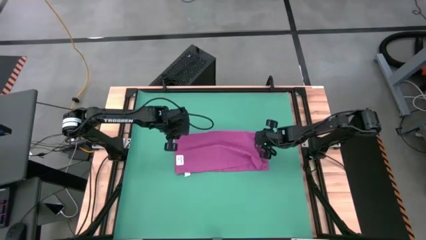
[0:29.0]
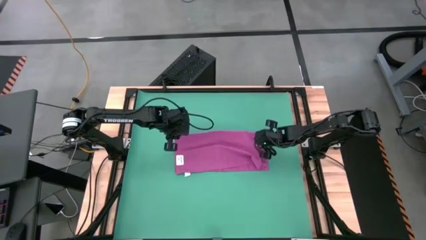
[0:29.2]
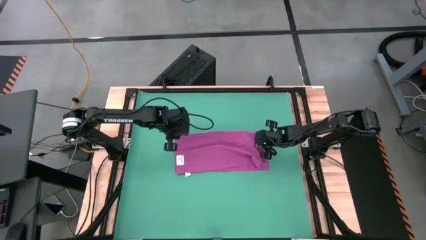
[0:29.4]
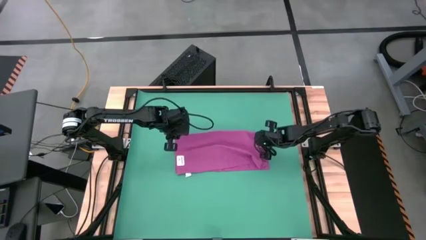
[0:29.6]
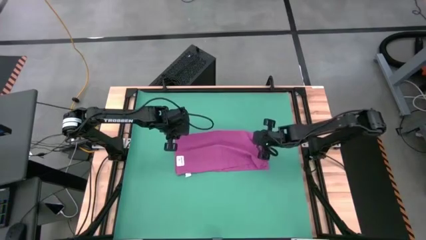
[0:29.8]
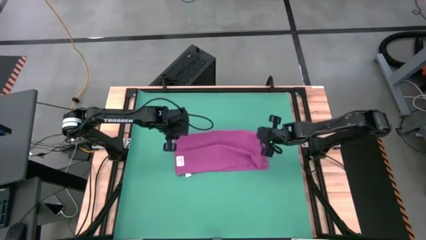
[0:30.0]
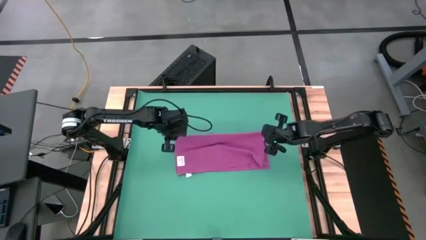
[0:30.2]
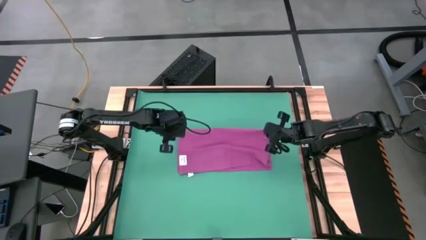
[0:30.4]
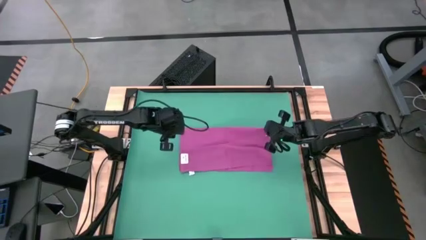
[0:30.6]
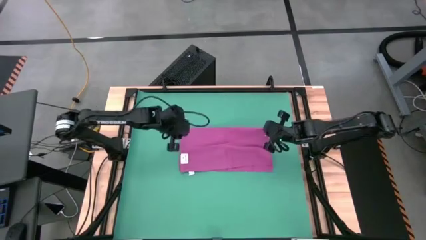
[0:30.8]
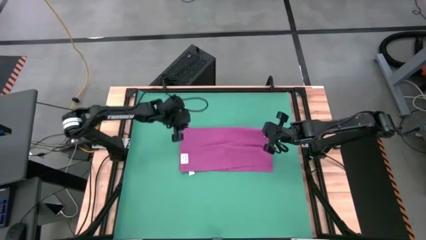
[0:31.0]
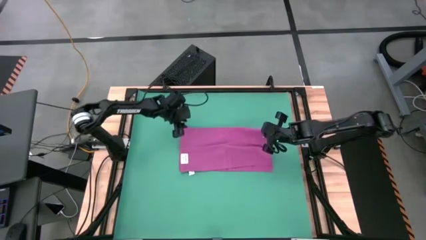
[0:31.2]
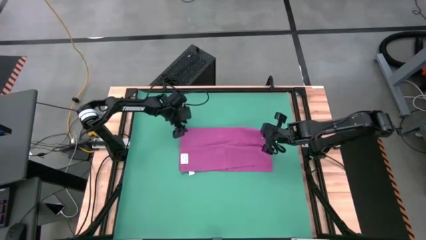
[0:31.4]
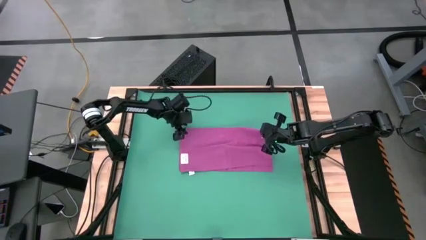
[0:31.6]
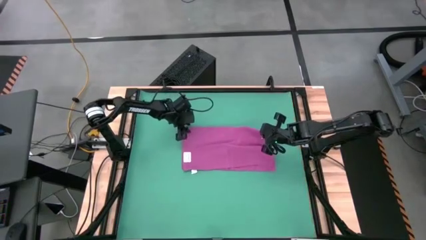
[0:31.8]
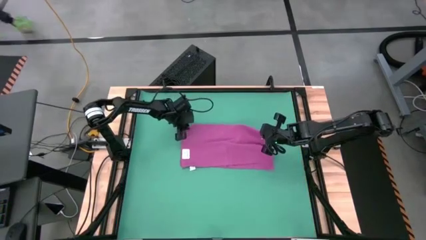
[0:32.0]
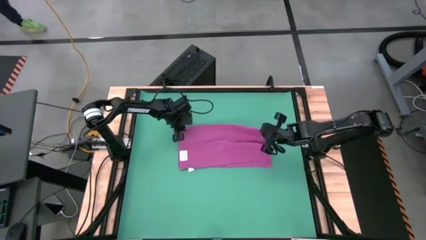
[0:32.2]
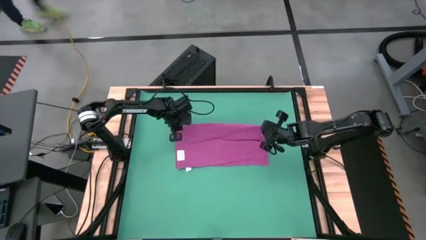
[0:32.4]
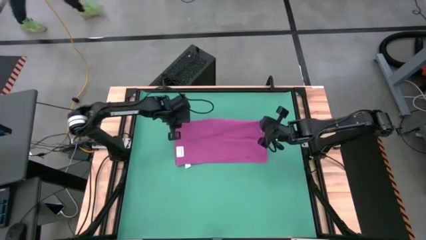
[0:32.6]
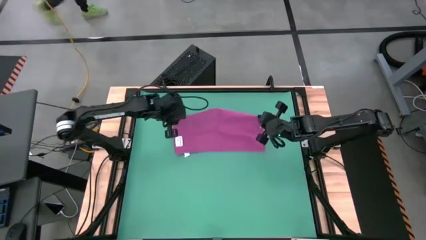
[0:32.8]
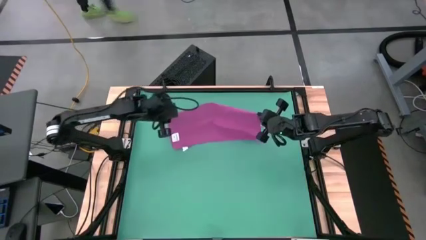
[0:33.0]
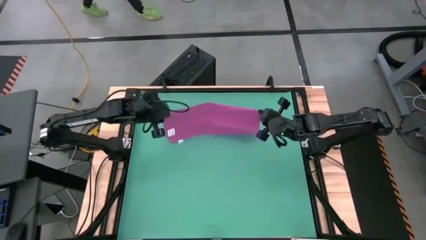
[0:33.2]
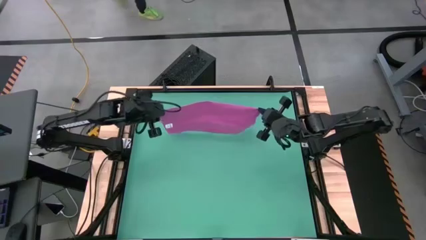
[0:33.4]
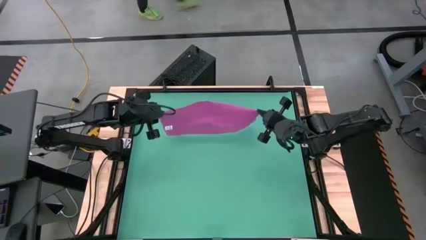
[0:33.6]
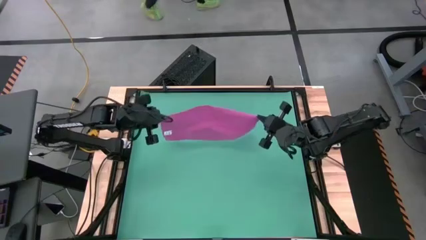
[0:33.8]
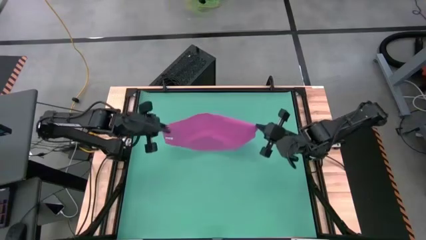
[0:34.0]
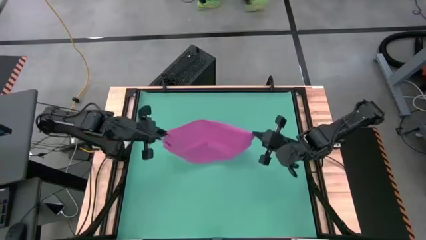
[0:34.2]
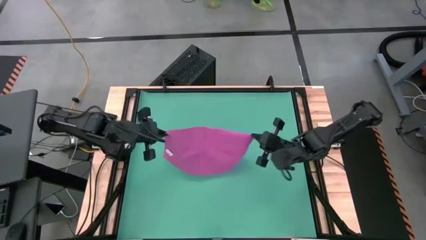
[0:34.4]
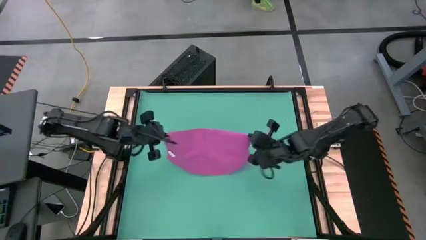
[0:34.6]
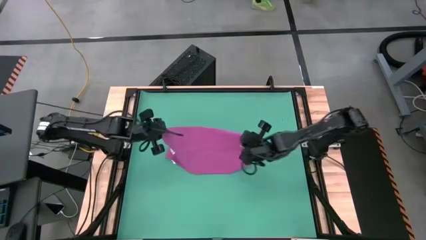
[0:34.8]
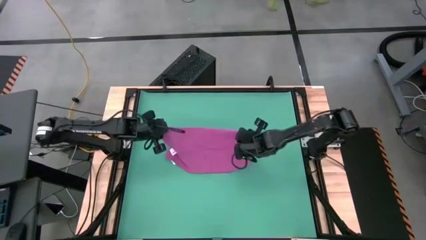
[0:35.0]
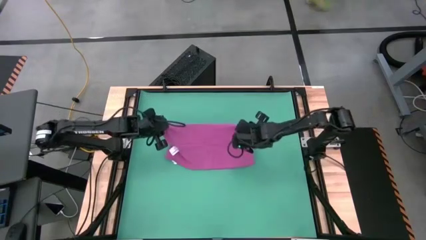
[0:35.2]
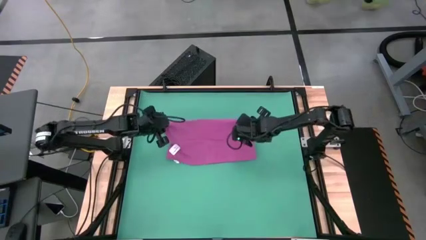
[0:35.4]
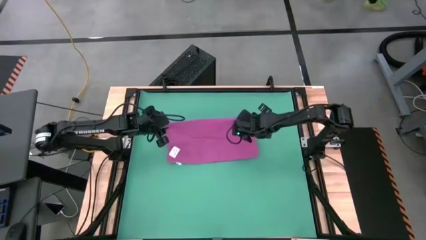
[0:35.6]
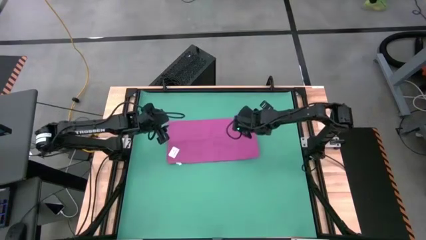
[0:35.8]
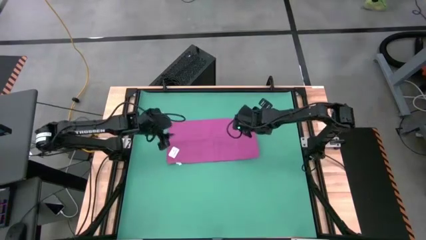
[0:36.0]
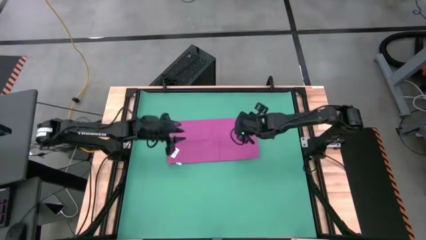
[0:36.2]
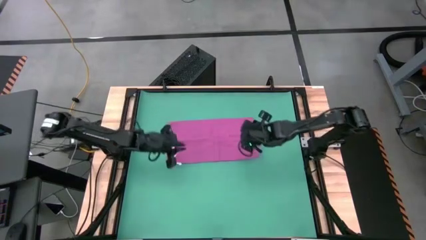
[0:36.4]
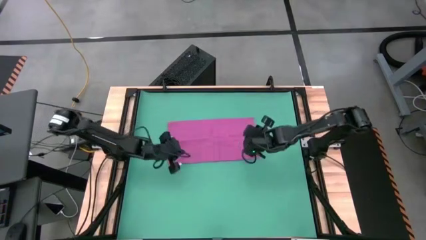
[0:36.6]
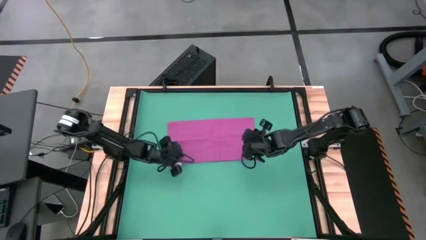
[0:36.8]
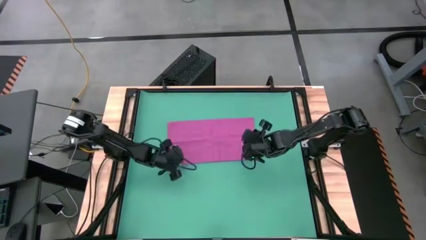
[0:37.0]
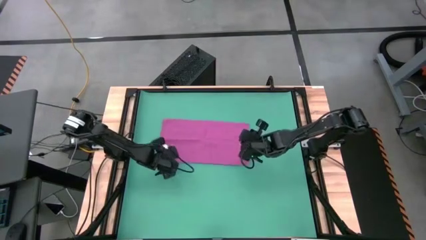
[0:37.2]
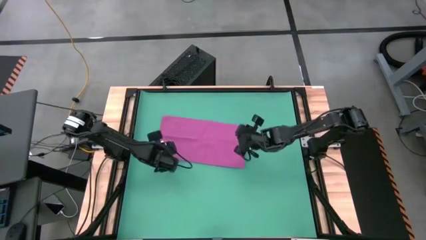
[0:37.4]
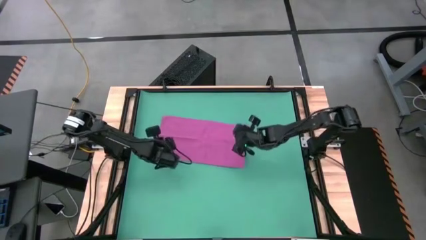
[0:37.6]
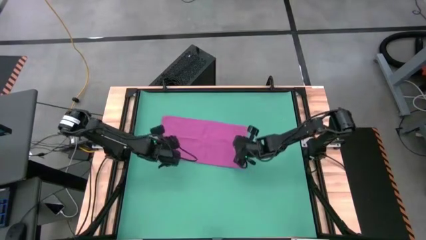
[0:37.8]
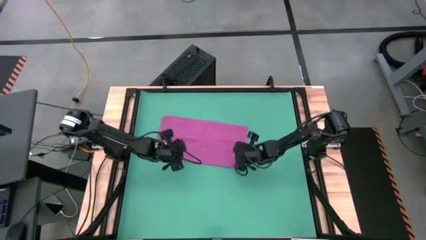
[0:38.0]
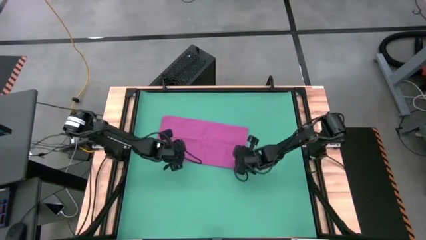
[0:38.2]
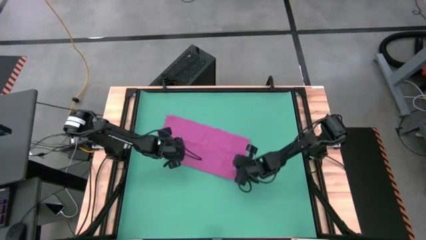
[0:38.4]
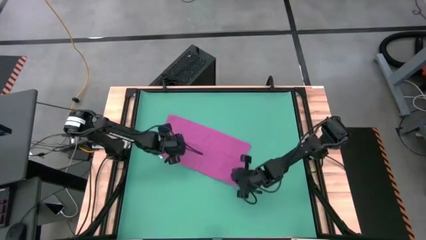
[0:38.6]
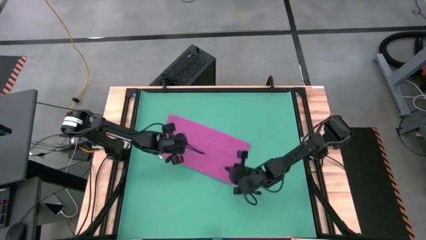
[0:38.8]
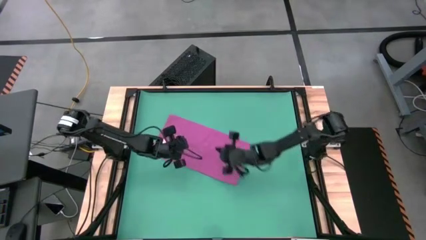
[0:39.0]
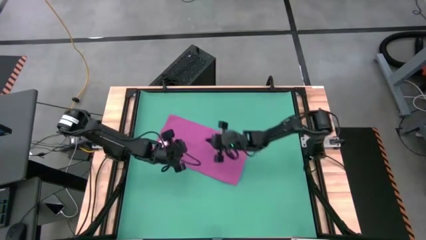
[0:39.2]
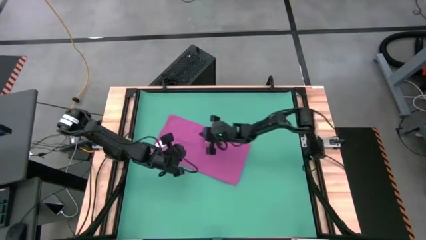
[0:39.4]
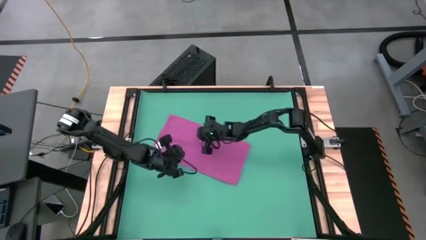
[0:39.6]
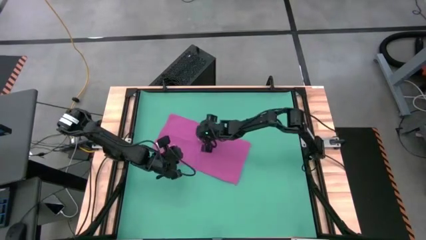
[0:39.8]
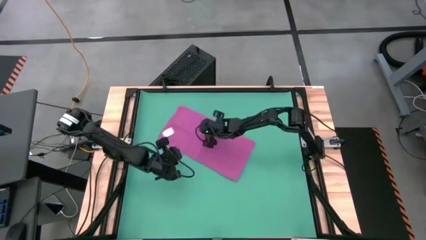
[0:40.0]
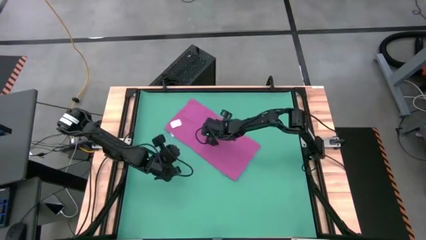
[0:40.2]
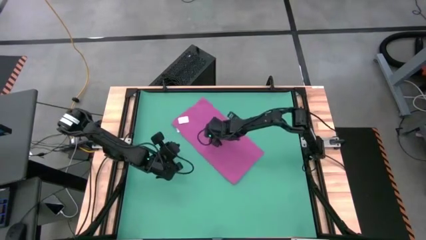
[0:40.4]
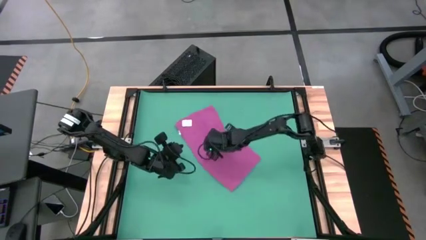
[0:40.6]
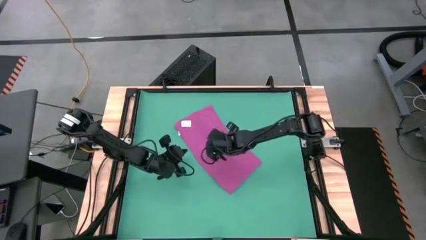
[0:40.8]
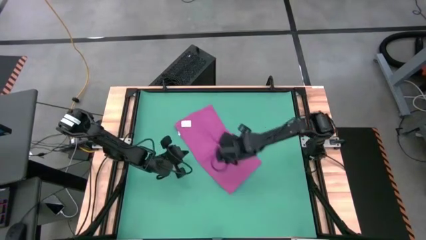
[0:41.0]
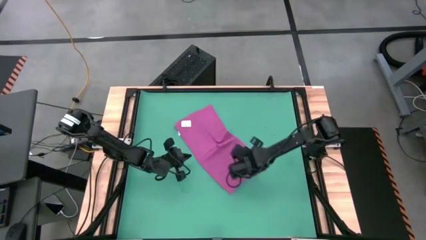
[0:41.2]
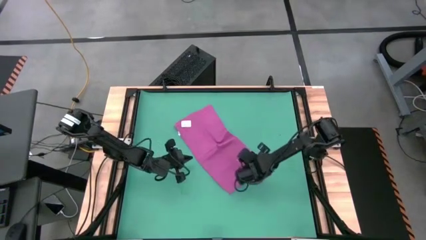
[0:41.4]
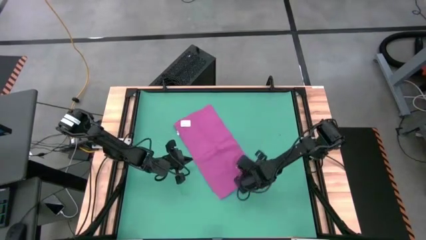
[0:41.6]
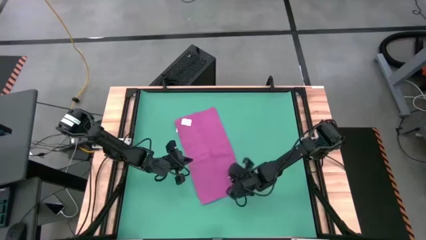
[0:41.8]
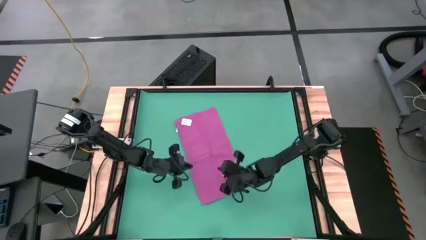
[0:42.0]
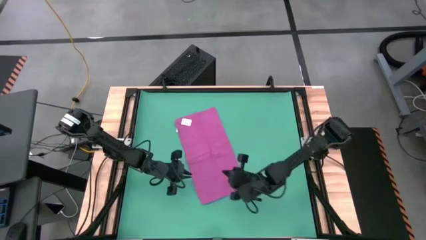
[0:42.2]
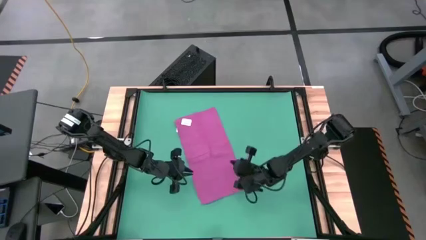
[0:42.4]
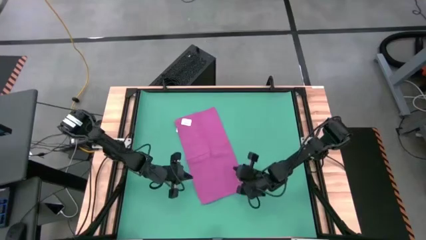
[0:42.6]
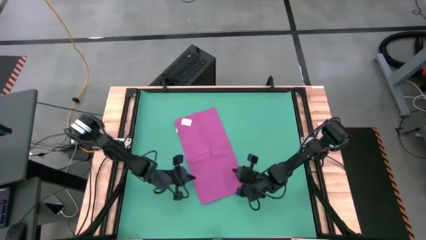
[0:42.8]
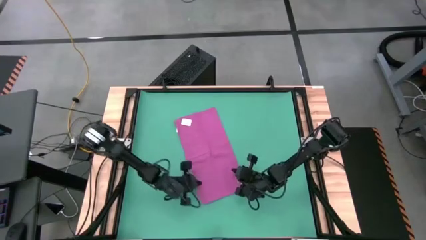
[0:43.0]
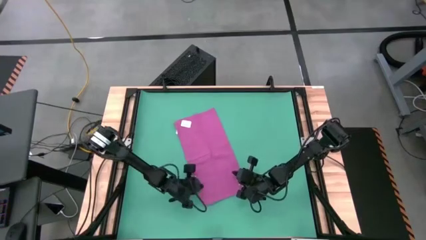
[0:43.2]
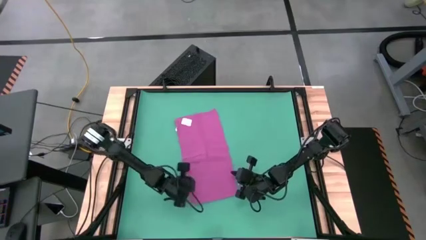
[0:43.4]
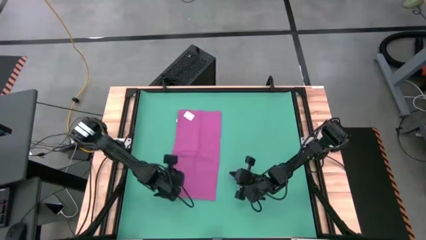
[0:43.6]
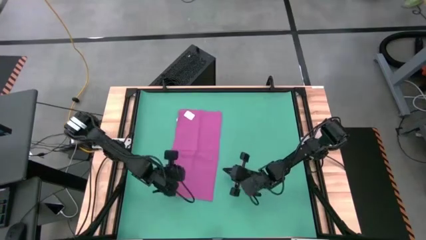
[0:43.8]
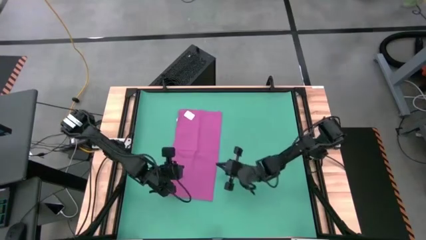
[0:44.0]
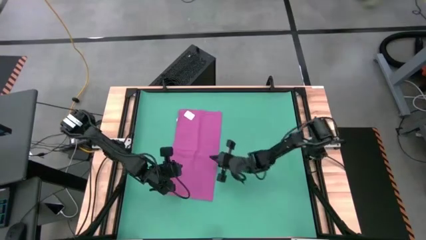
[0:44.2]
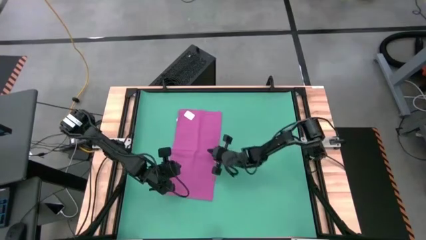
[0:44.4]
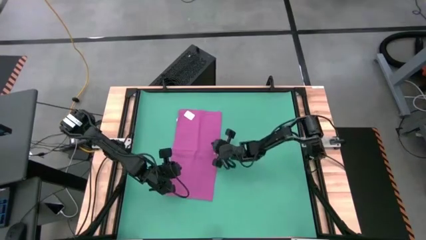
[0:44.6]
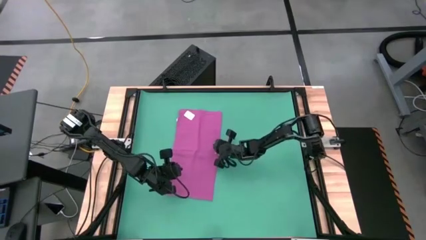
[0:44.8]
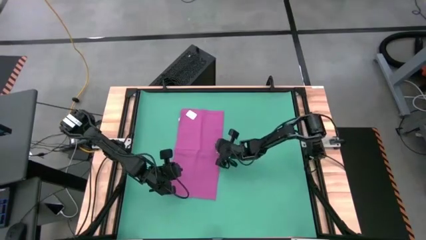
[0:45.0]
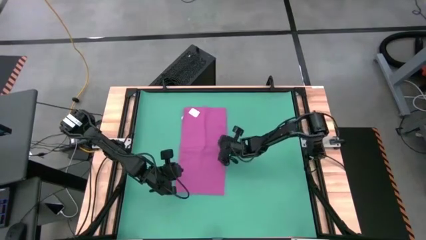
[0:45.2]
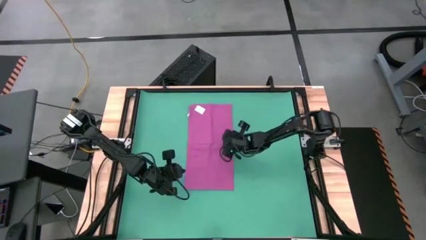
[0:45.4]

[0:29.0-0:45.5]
Task: Roll towel
Fold the violet towel
